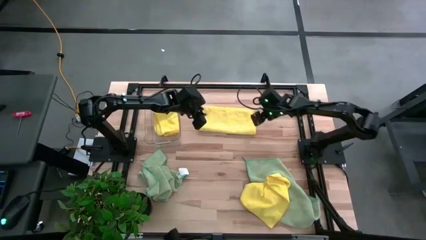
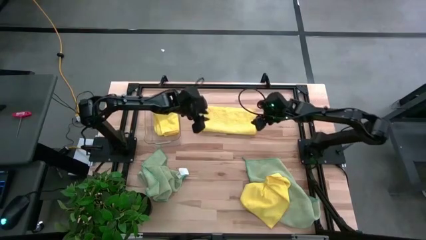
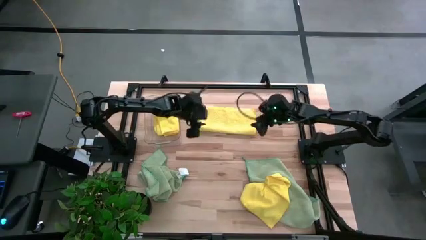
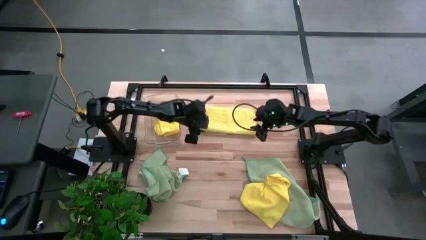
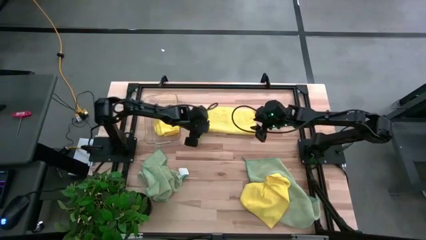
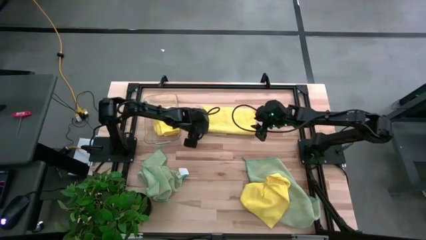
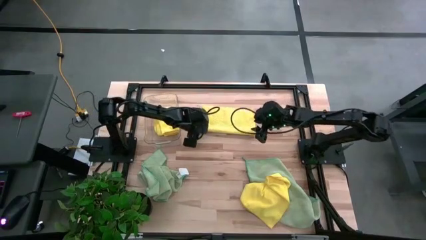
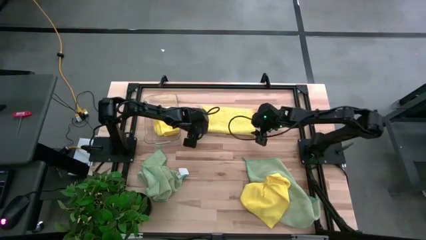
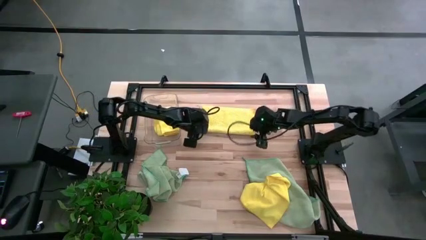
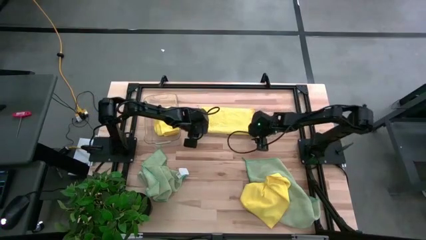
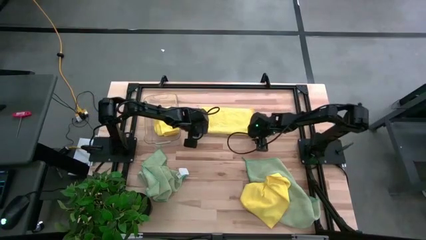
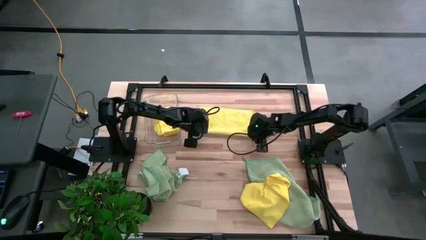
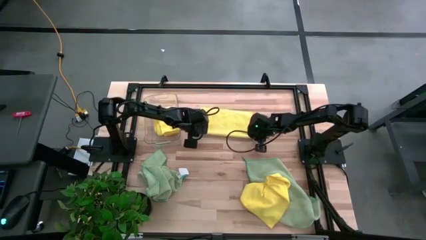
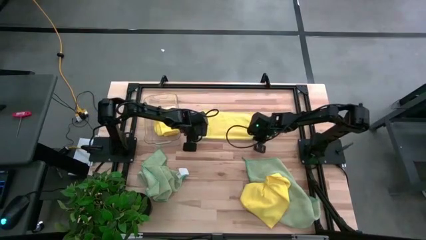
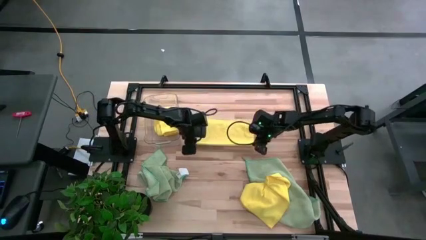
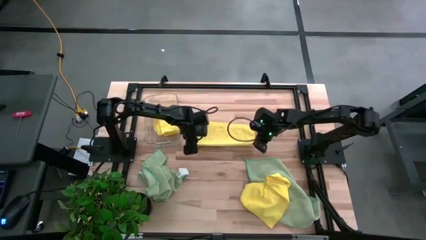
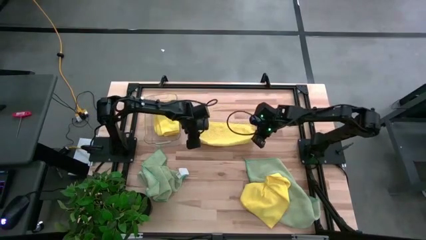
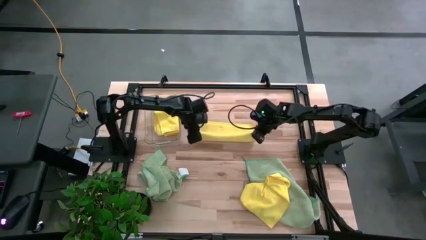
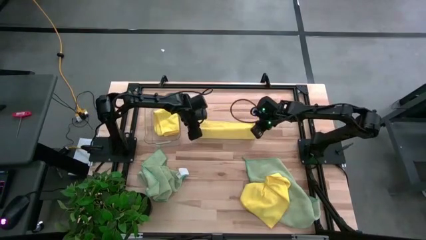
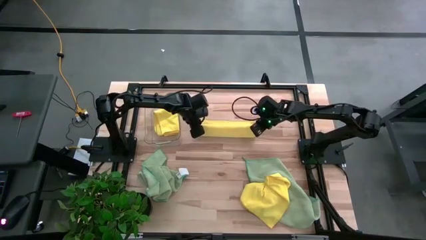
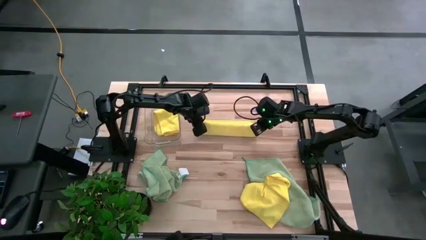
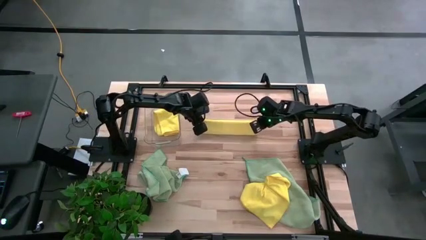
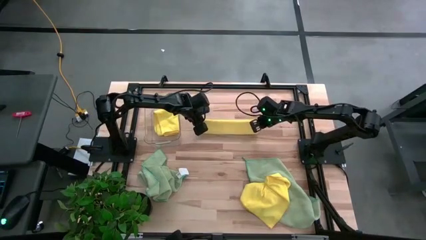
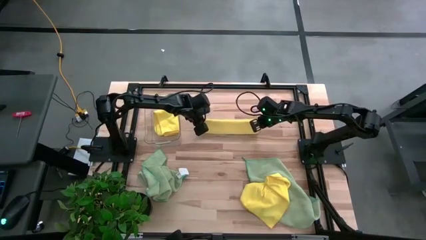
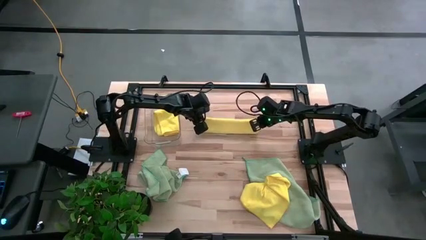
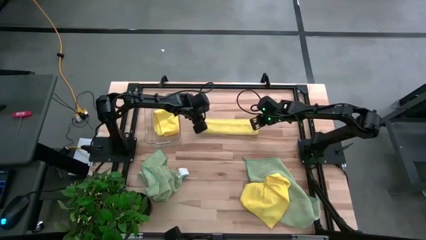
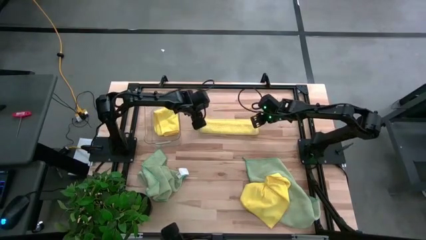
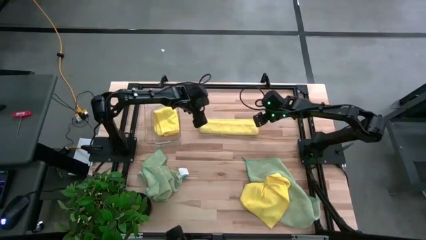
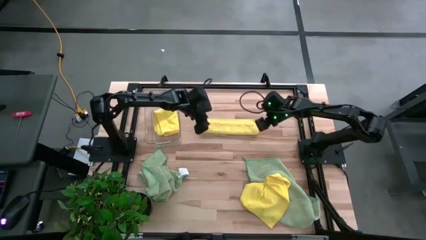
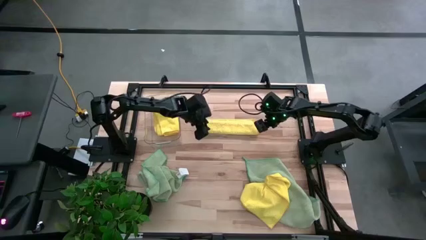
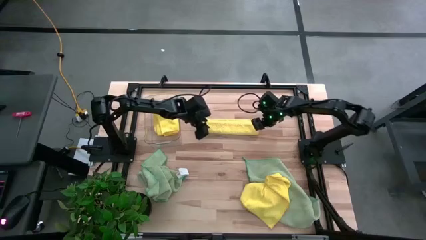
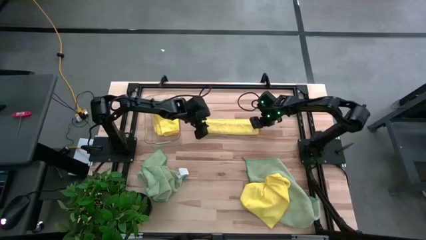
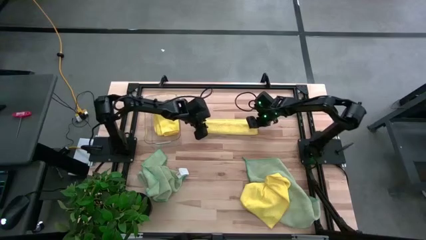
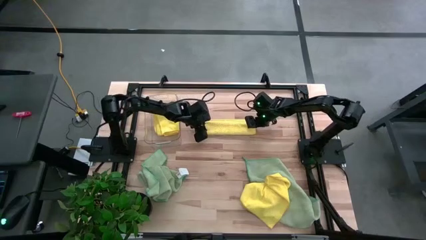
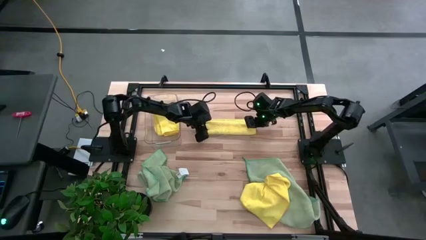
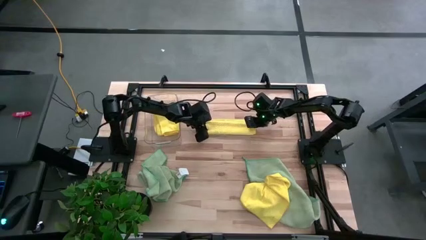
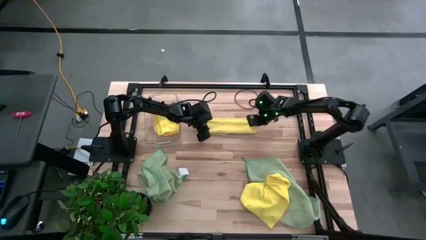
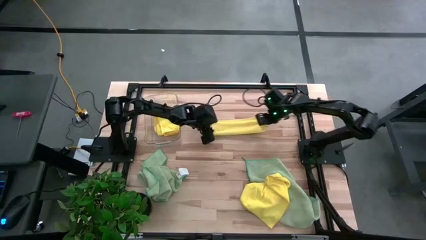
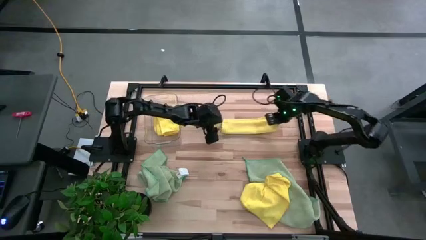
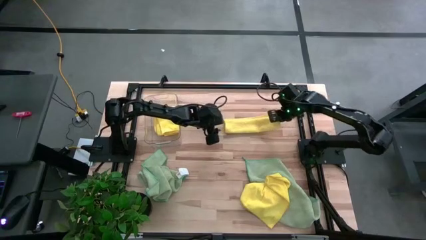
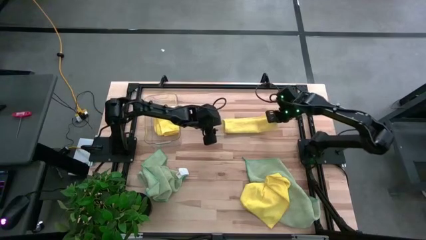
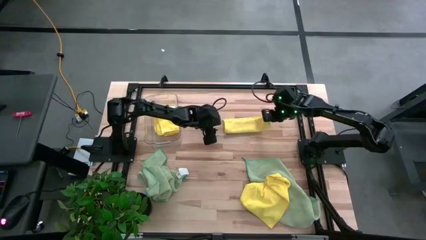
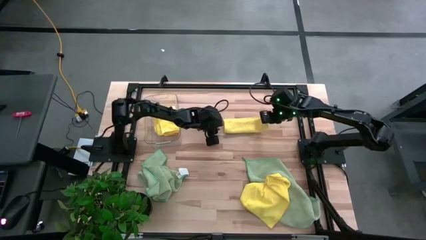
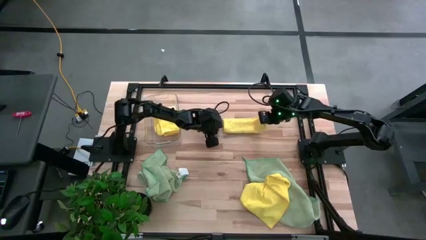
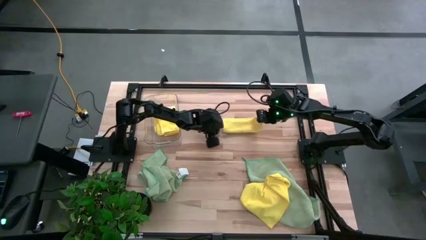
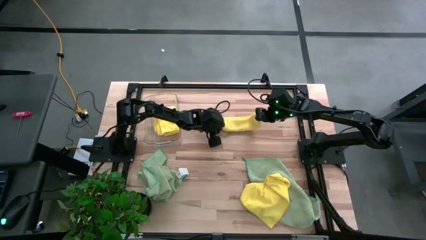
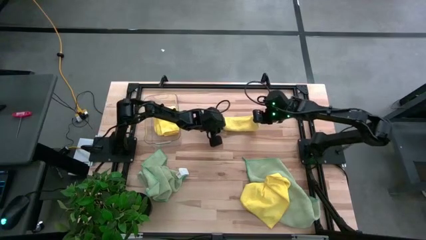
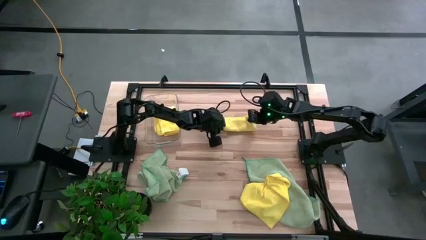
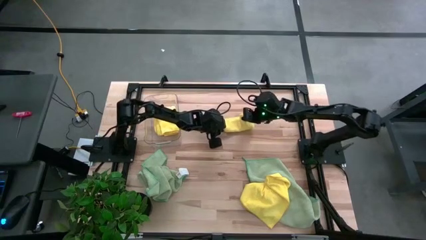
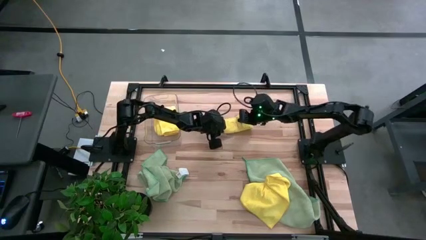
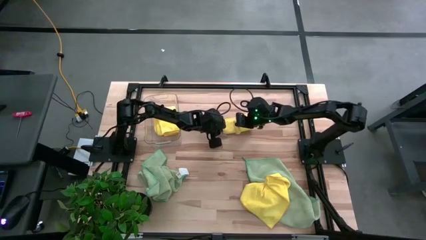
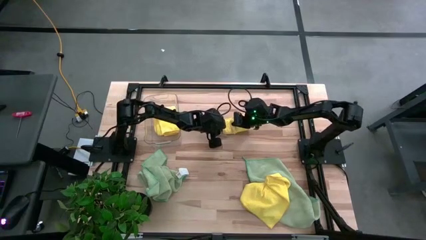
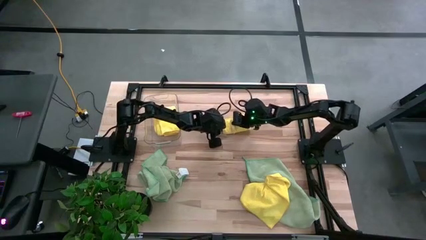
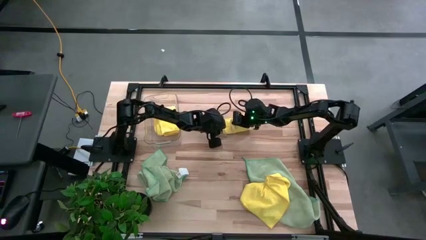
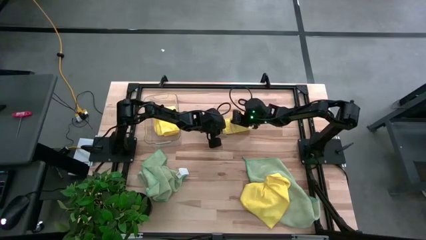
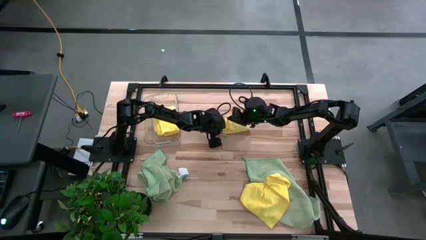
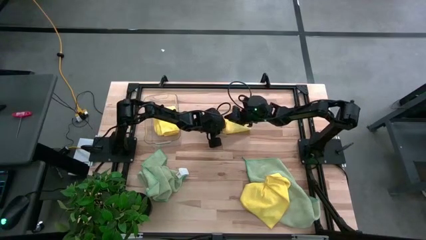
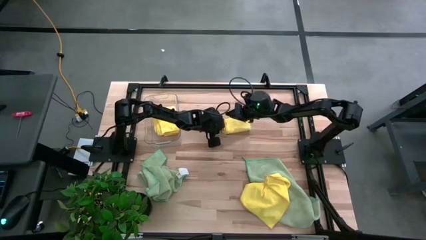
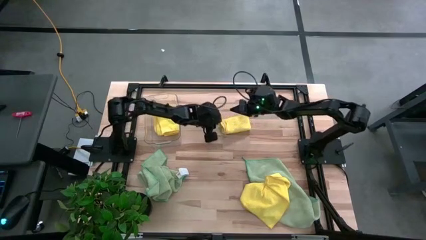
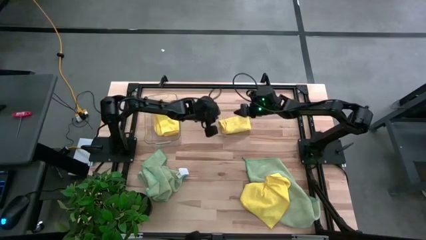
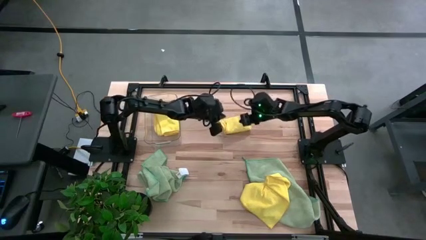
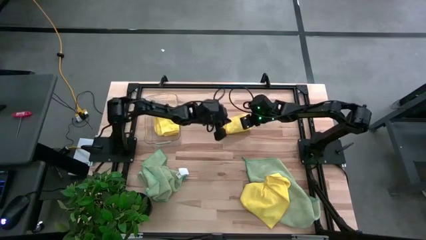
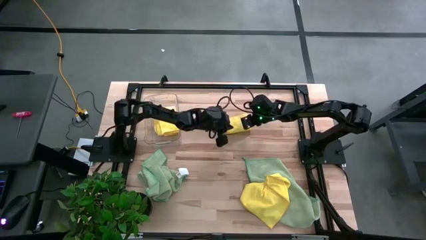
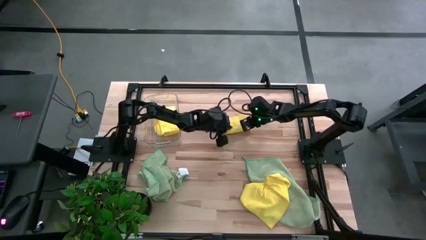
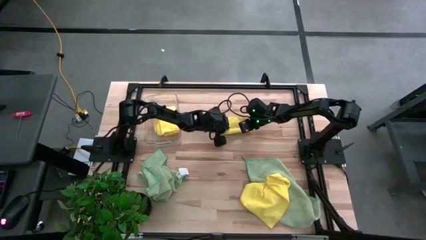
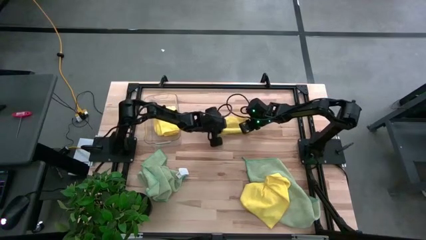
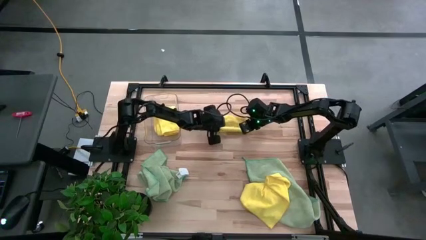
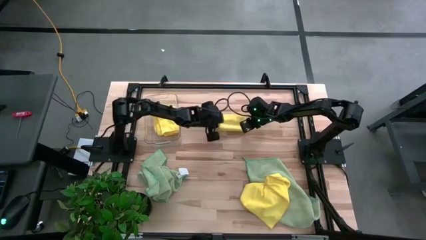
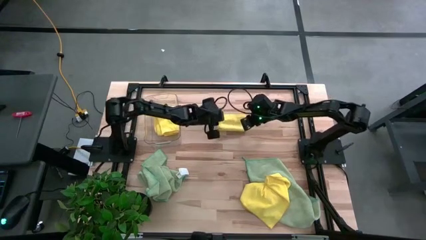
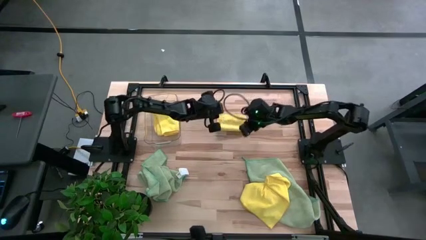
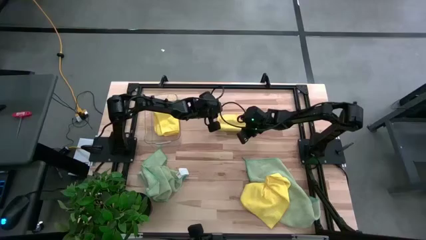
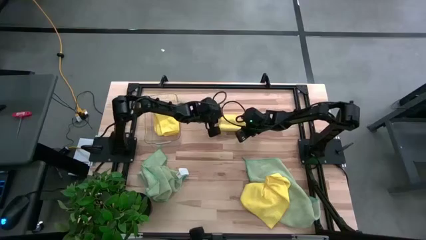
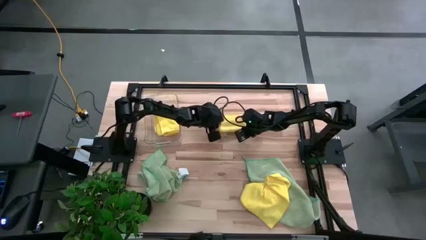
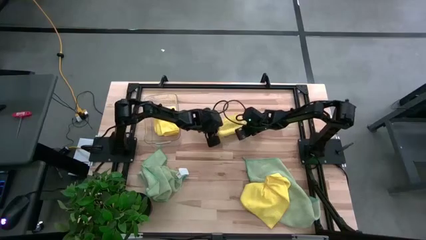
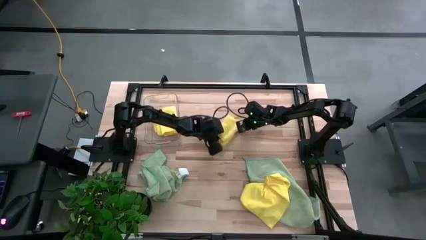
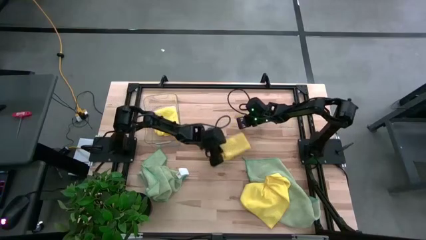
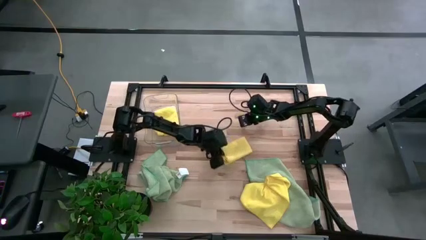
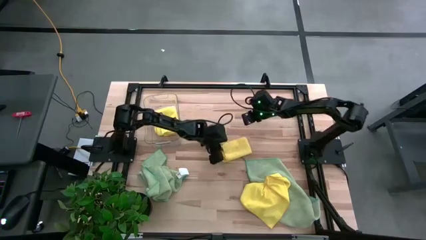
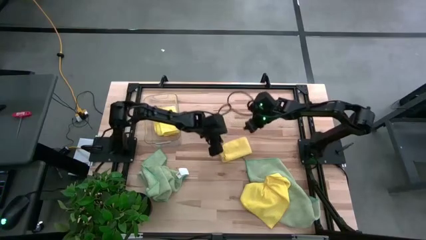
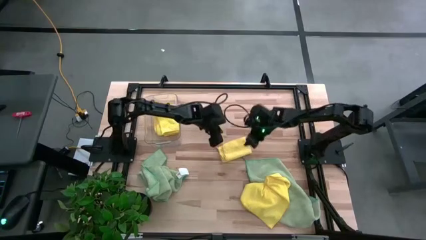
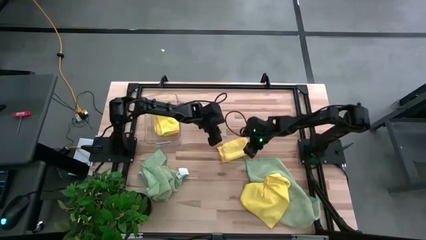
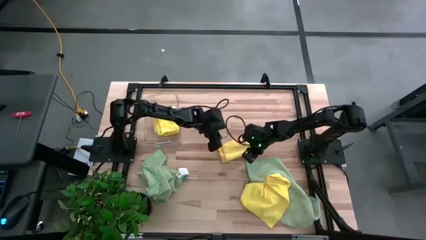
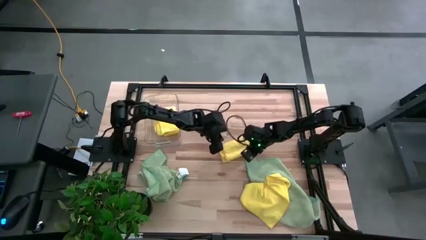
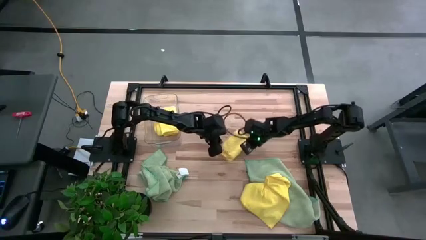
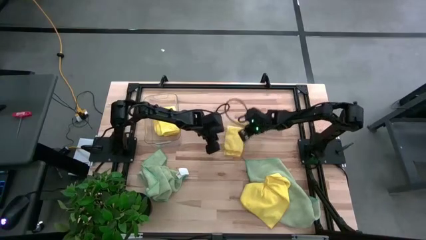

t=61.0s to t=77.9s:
Task: Fold microfiber towels
Fold the top yellow towel
